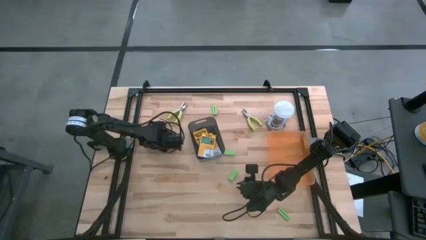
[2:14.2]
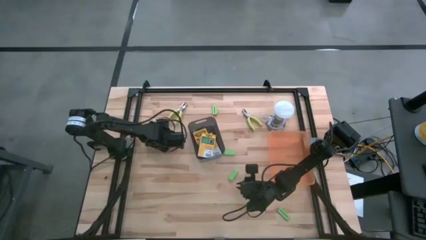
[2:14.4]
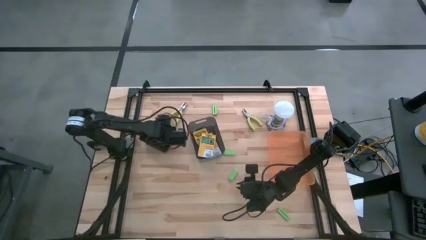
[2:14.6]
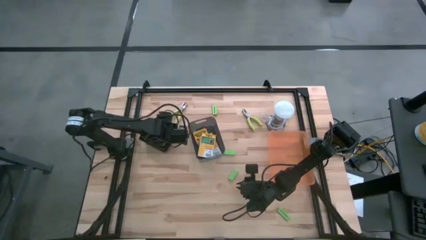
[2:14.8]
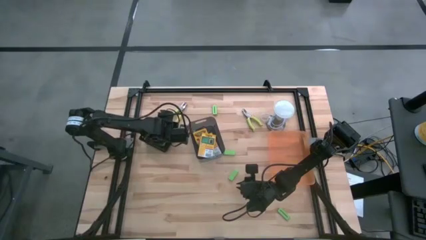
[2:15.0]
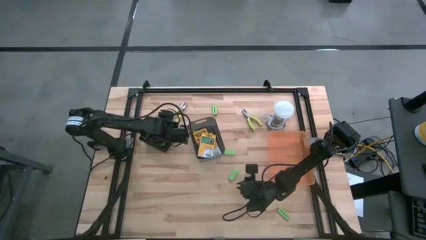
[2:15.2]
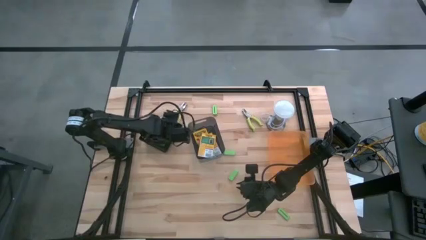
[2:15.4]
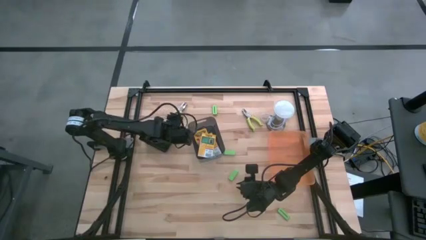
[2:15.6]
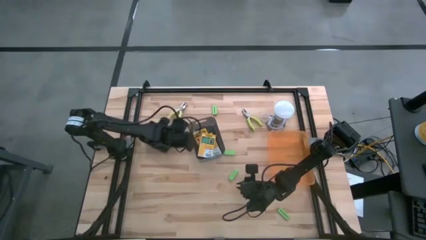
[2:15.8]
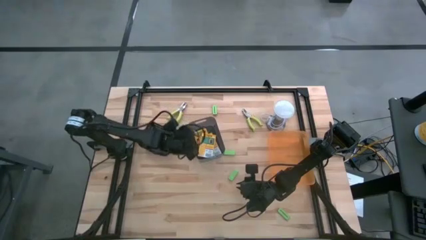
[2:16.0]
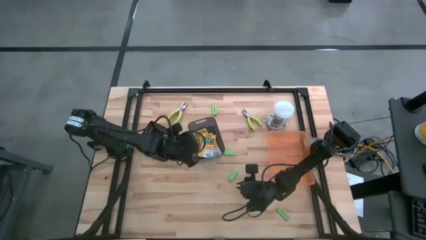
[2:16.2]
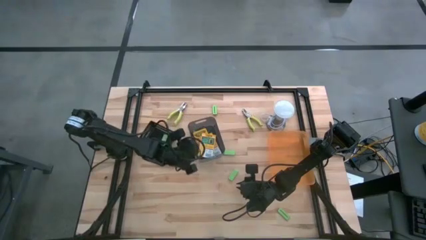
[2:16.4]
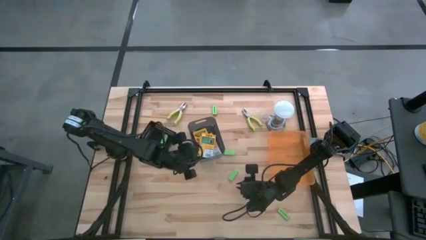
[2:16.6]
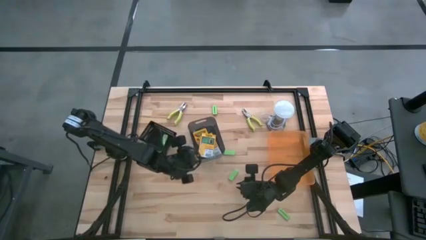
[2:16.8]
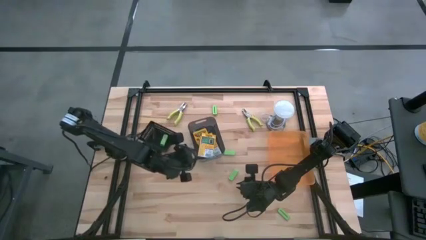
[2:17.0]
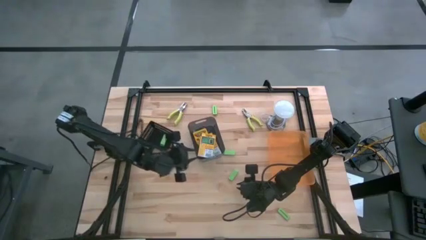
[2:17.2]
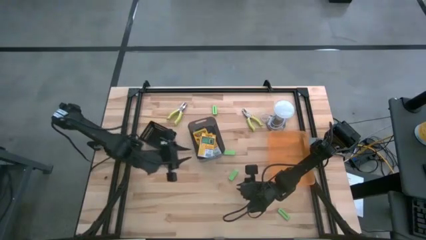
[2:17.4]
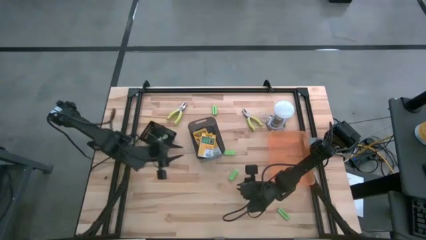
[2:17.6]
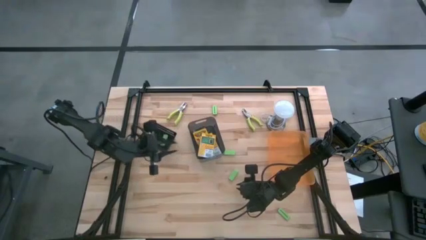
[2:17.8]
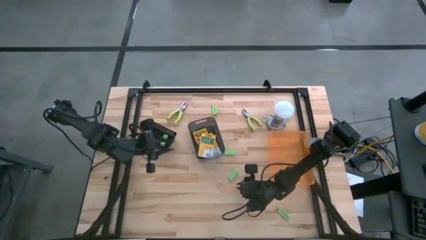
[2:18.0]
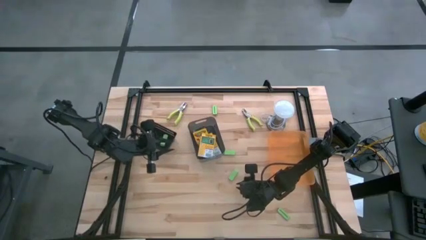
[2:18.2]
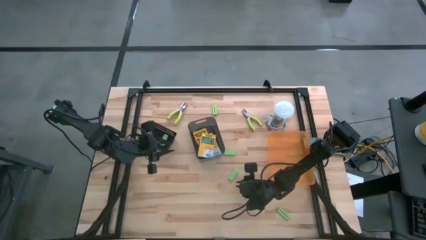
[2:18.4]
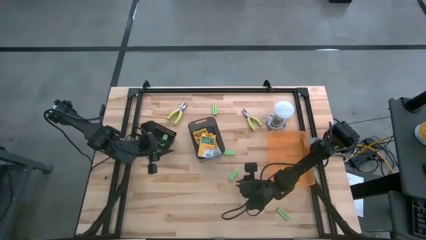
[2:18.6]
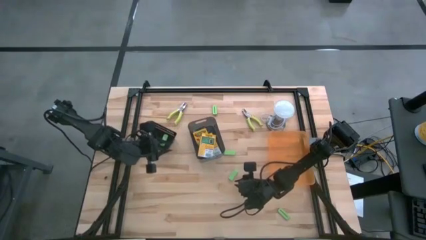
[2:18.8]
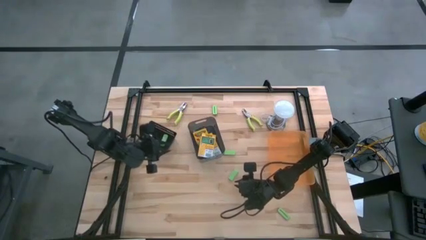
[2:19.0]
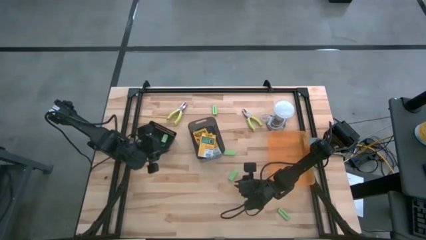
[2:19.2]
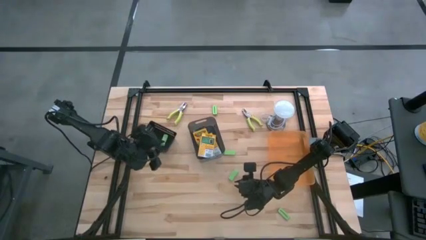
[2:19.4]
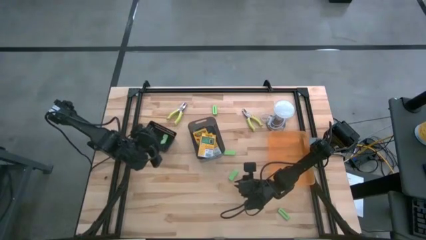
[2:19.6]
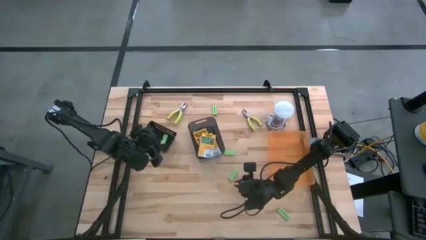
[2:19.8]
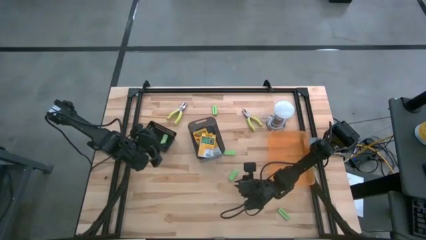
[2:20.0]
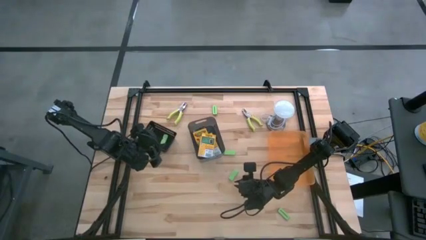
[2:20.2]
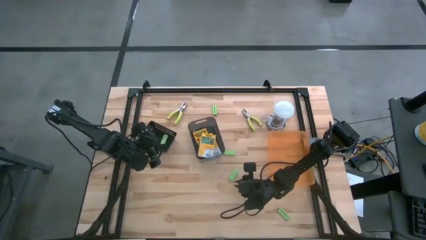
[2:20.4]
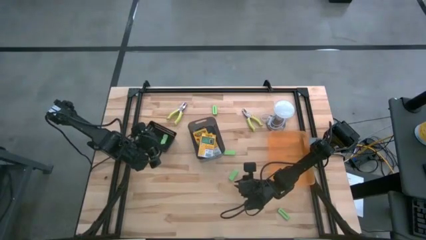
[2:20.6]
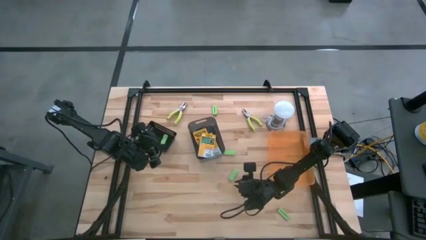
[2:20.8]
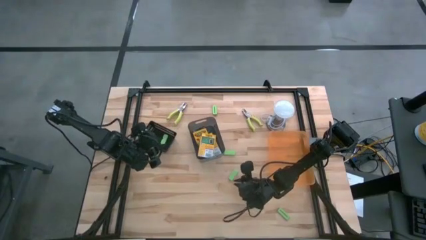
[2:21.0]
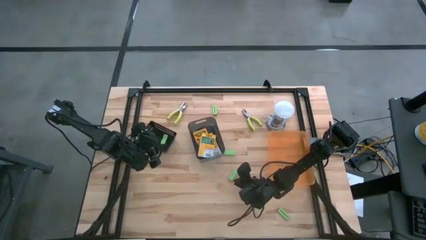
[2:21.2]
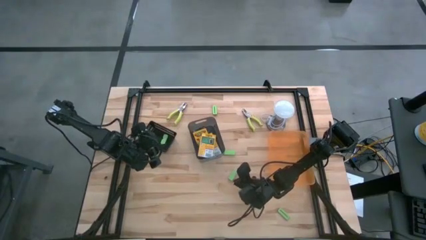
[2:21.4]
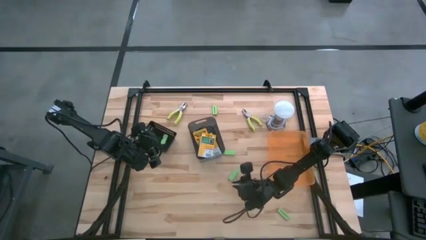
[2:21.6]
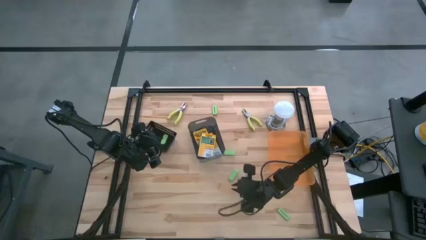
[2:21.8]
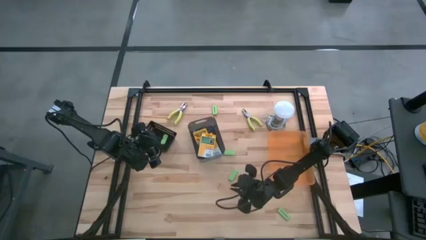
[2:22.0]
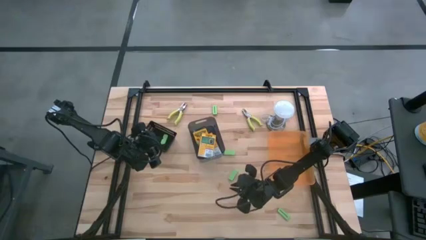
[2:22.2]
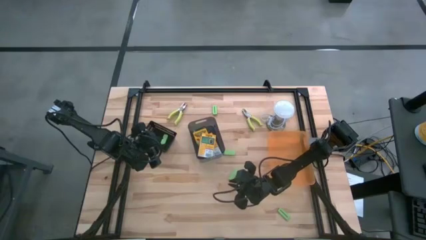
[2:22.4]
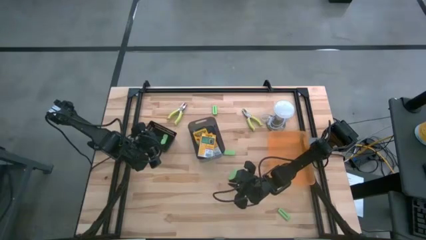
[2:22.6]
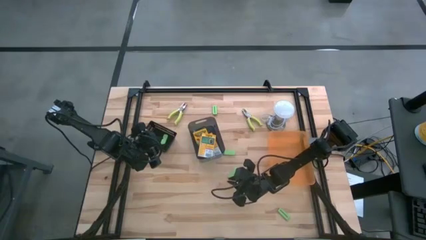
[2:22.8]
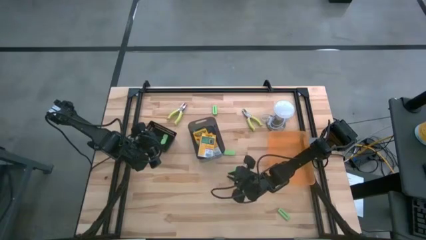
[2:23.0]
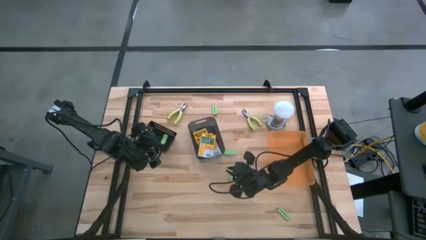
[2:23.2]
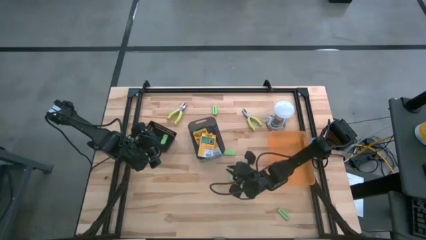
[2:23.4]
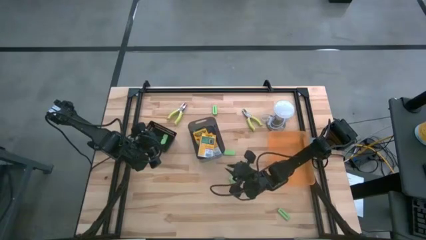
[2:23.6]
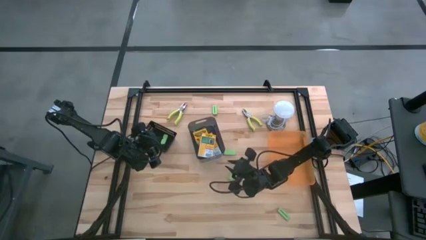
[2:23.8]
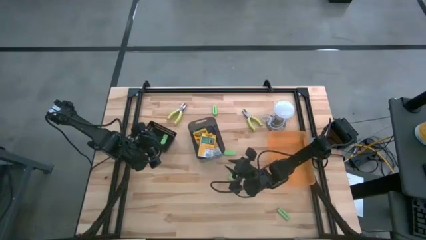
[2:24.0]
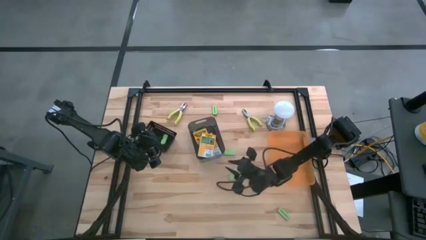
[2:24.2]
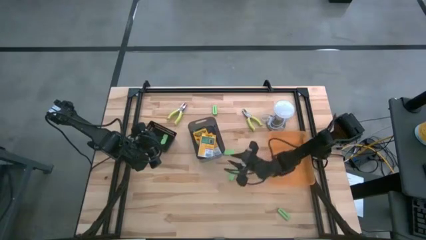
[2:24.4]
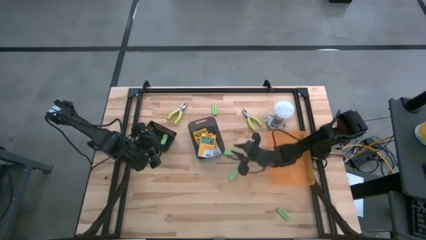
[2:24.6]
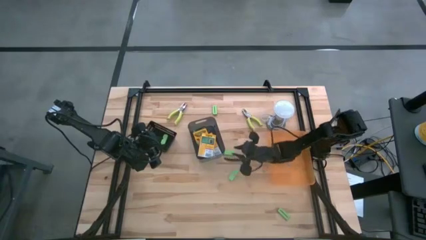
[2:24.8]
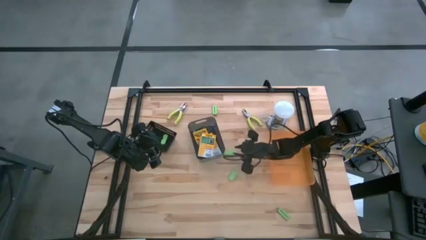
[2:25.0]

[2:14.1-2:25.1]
Task: Pick & Place School Supplies
Put the light green eraser into the black bin

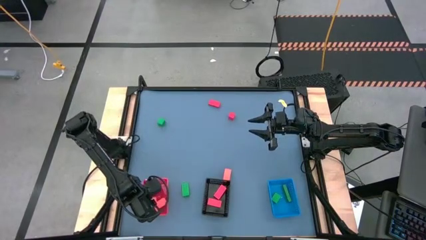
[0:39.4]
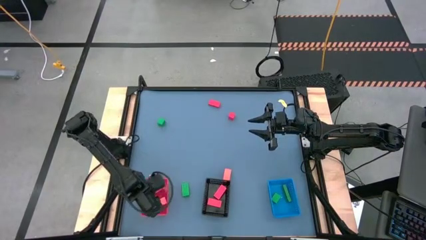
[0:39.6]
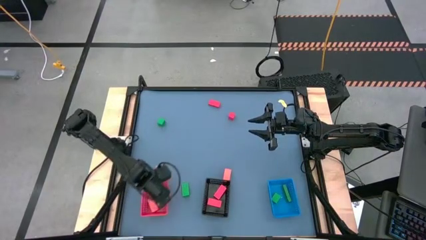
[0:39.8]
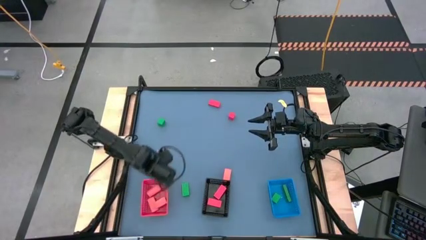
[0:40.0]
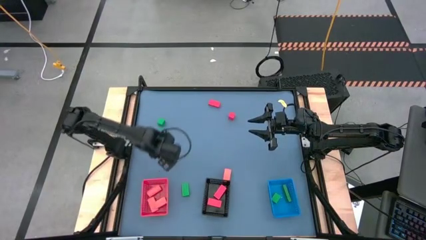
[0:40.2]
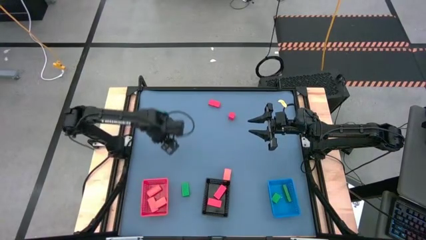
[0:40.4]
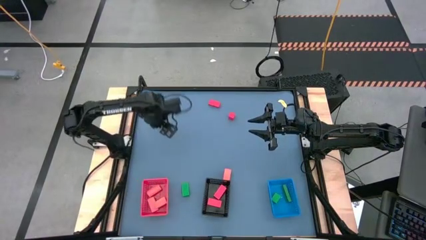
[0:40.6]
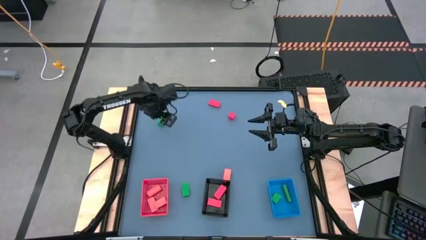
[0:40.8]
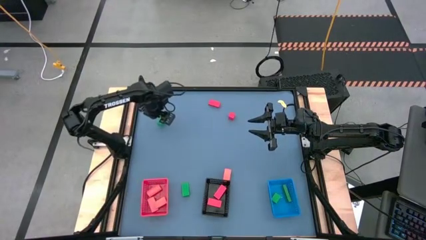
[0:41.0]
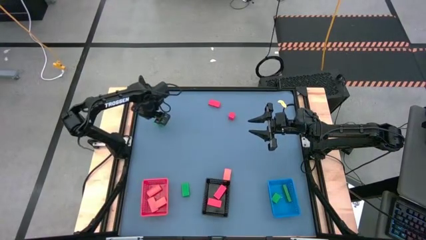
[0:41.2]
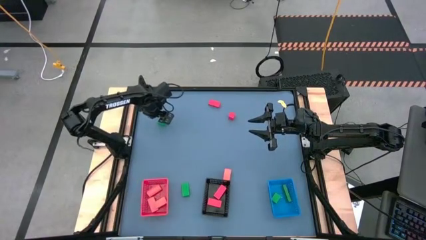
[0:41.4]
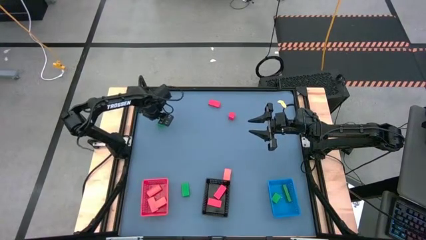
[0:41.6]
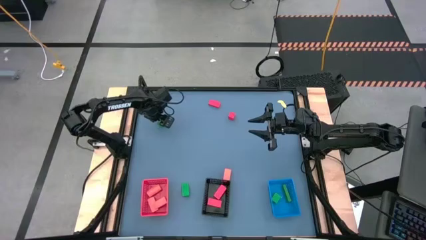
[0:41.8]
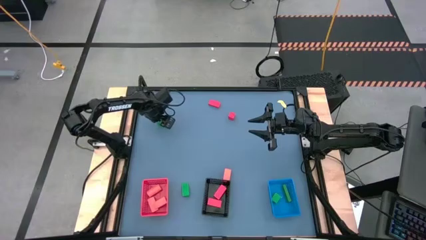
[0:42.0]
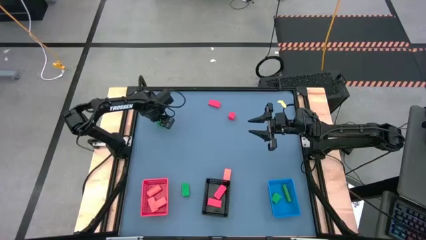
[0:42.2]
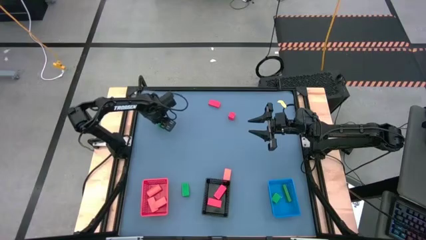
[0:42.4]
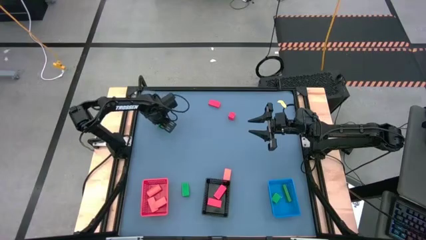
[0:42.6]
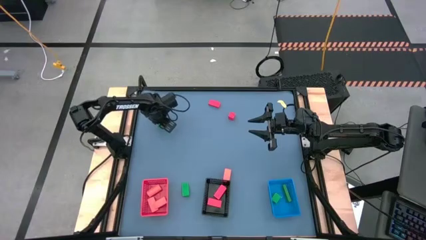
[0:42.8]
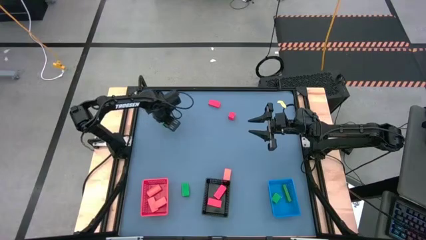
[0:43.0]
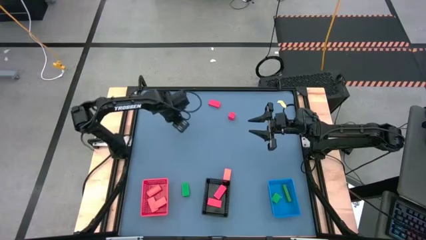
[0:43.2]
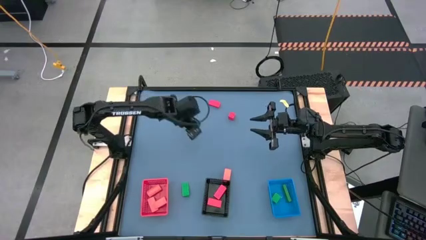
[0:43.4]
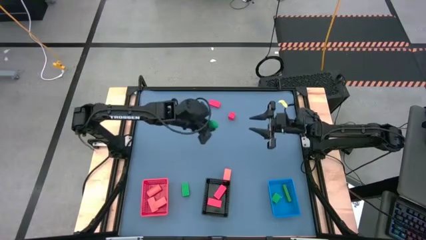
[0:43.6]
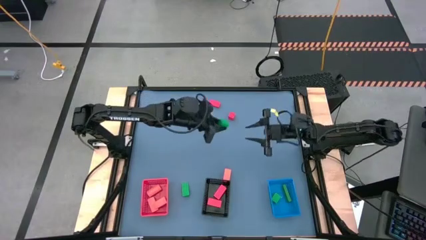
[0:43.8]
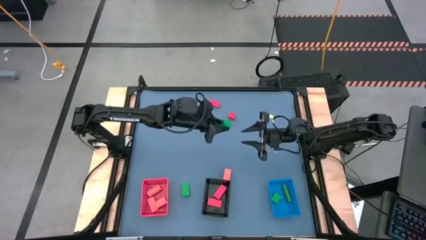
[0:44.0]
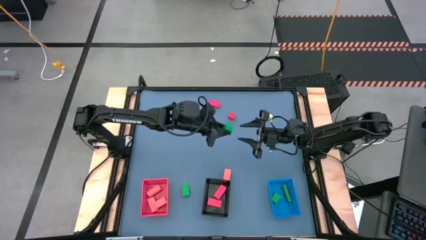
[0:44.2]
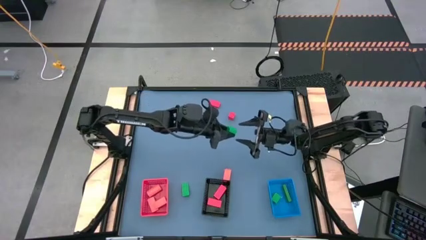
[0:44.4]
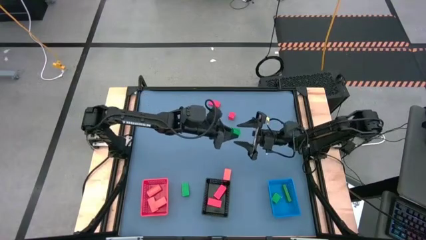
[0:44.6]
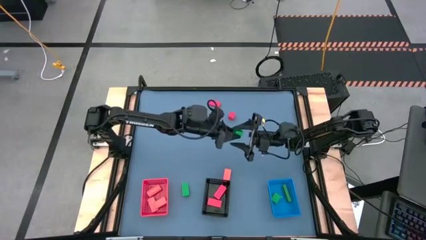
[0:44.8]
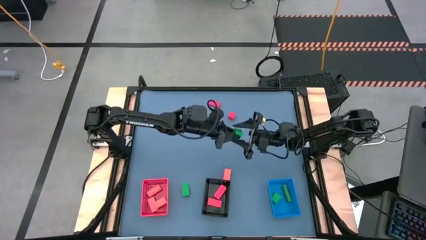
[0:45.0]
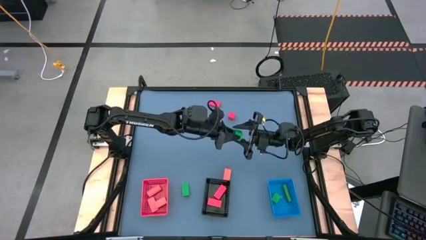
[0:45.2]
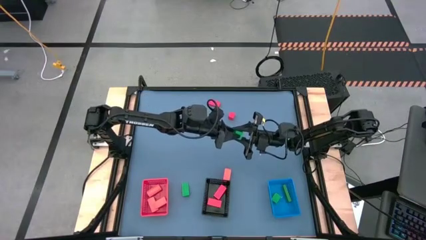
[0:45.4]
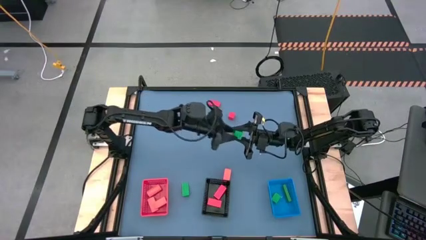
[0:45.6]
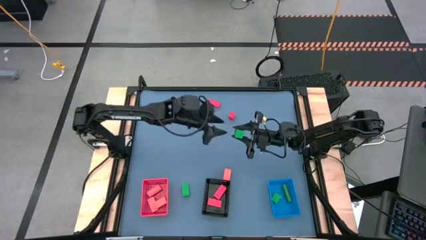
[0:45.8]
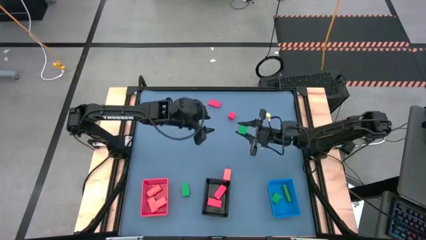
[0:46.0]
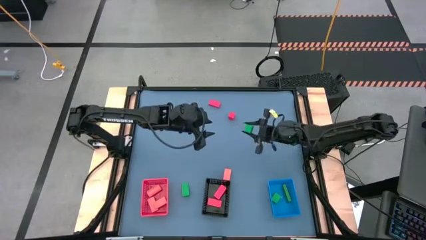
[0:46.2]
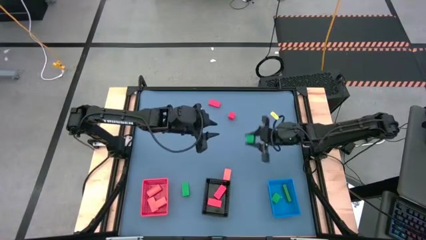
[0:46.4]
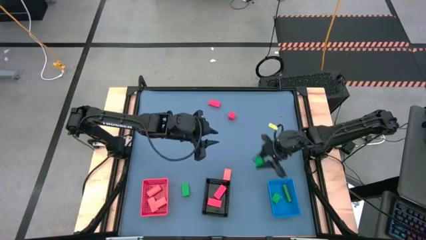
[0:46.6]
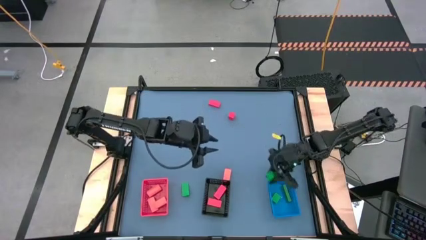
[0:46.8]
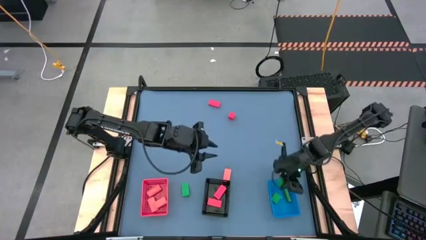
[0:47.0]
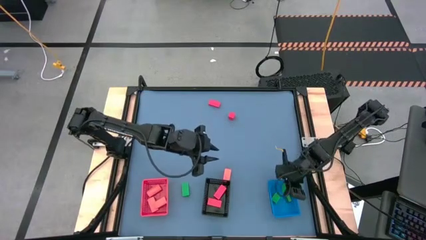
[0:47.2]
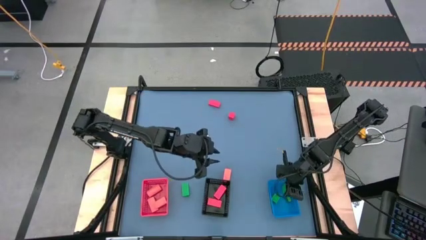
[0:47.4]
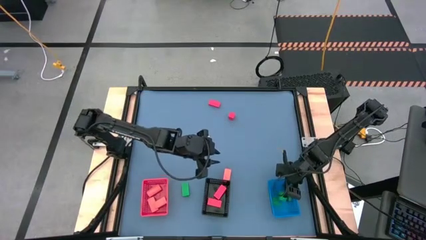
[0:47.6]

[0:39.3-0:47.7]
Task: Sort & place blocks by color
Put the green block into the blue bin
